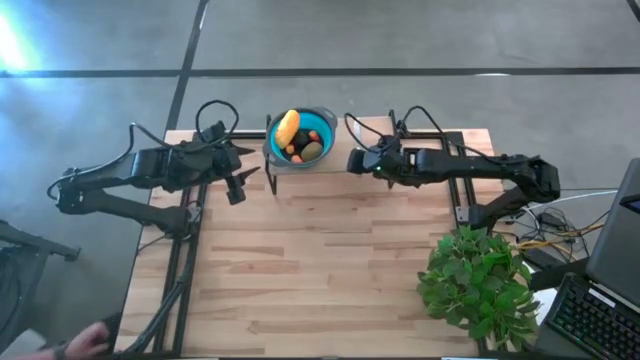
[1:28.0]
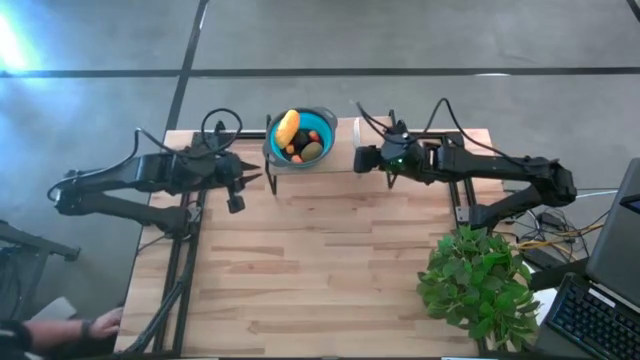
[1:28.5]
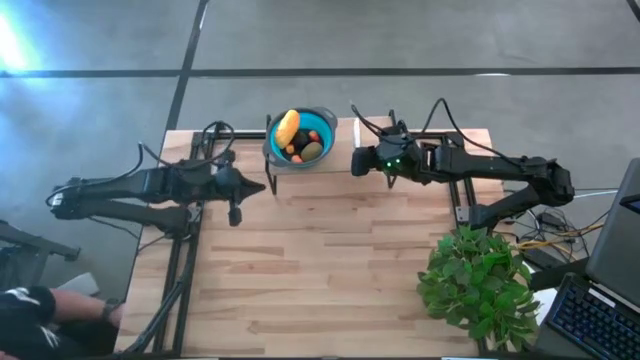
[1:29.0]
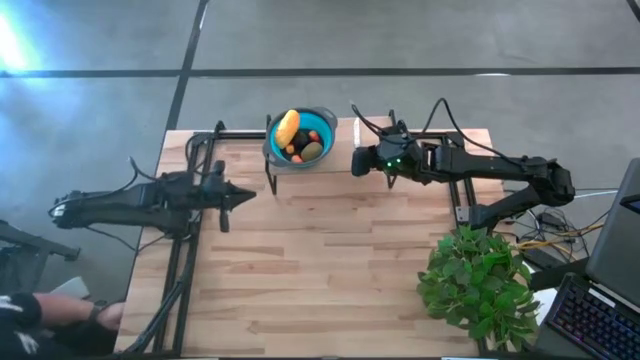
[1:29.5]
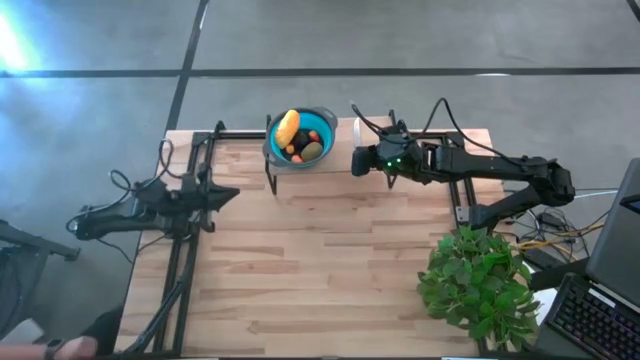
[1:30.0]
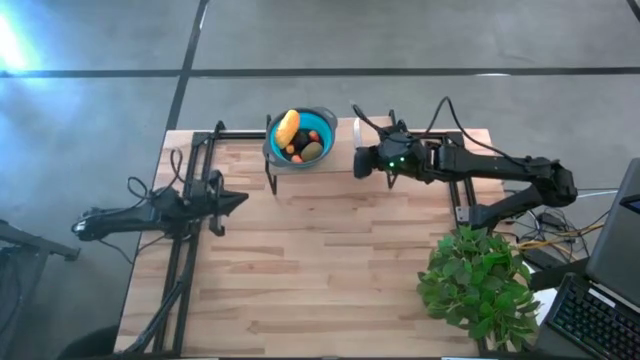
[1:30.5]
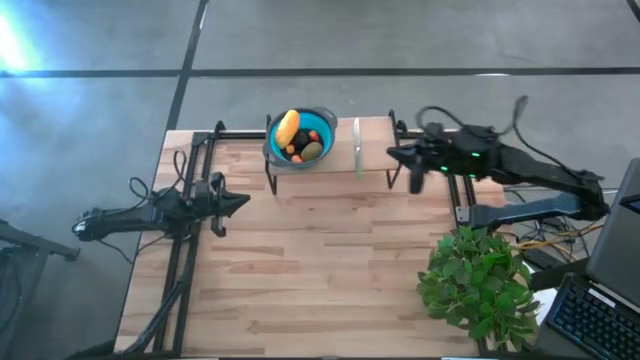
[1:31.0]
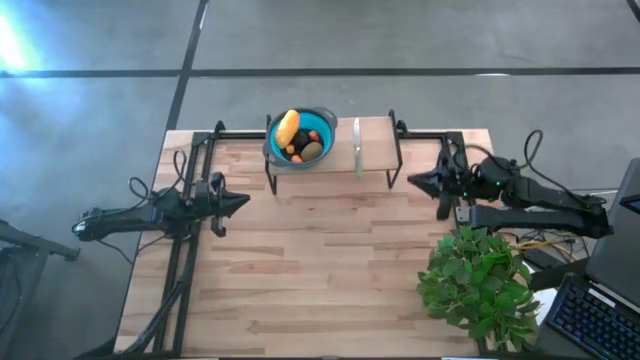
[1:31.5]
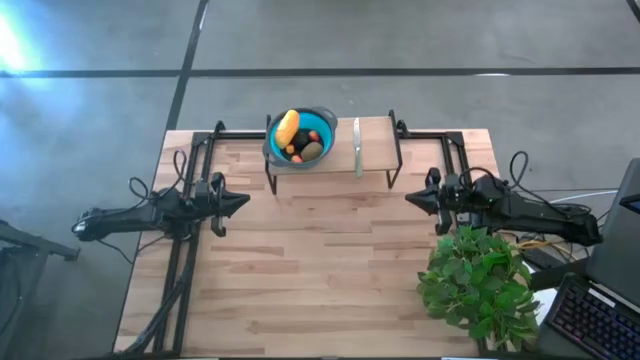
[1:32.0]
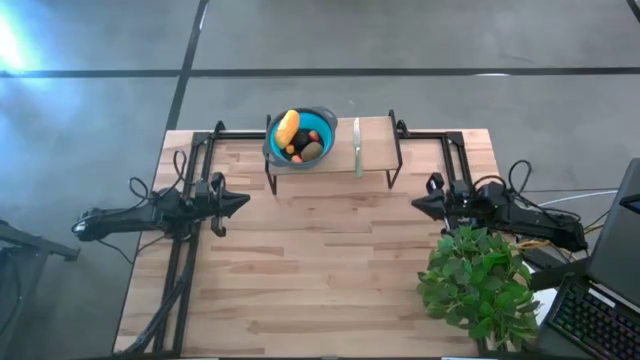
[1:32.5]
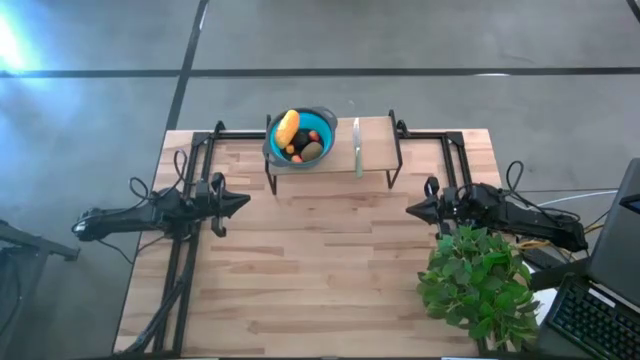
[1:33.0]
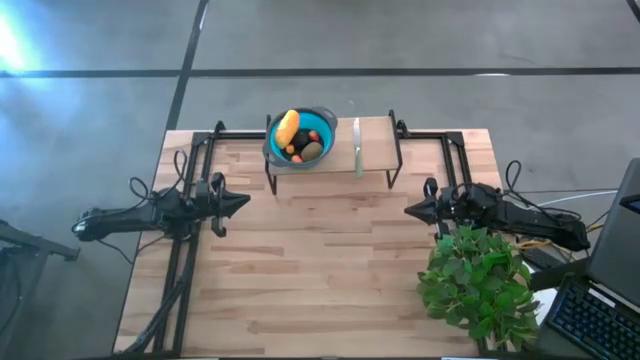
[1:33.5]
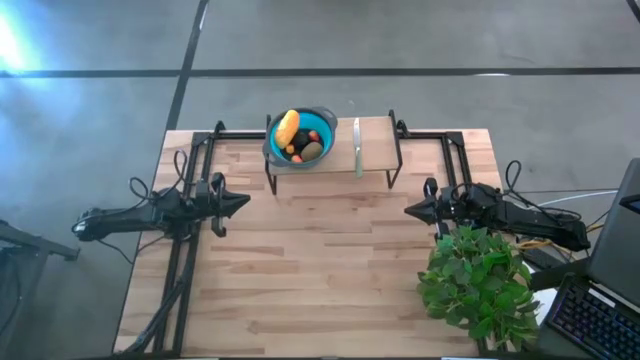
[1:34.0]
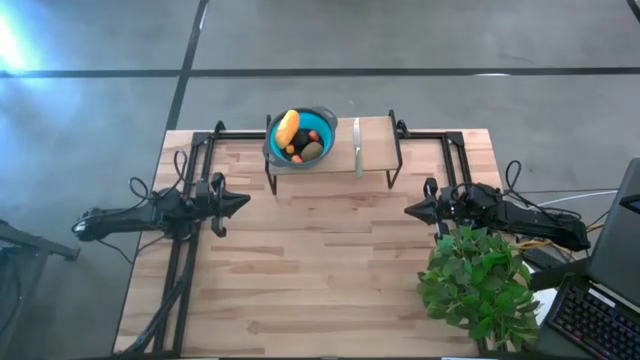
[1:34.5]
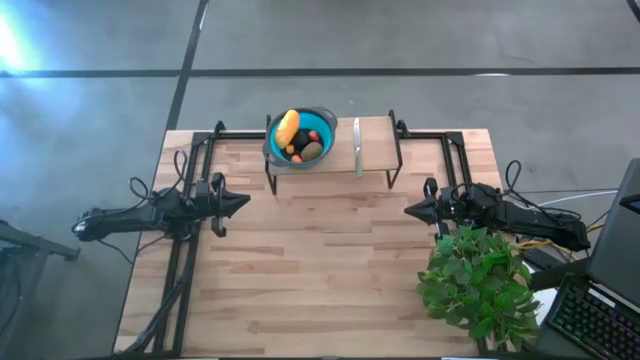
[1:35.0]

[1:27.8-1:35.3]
Task: Pick & Place Fruit
Return to Home Position

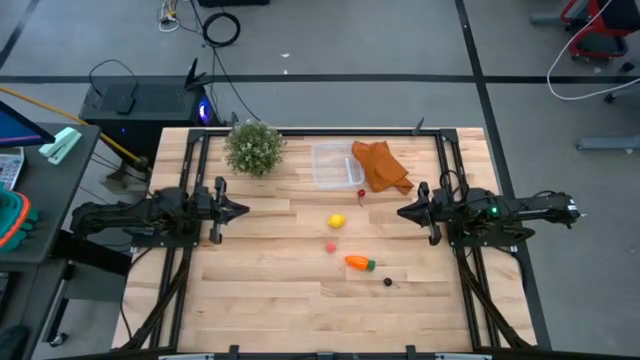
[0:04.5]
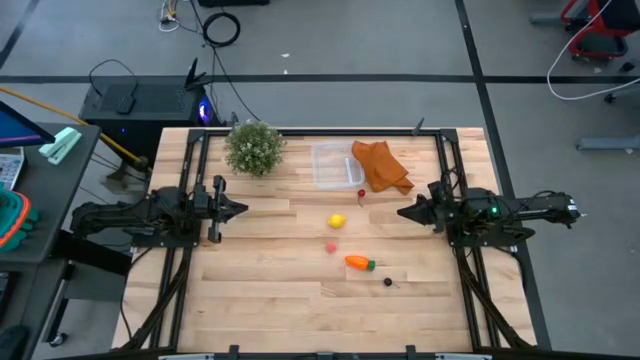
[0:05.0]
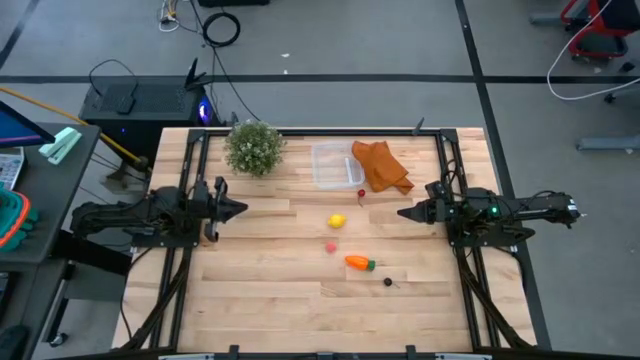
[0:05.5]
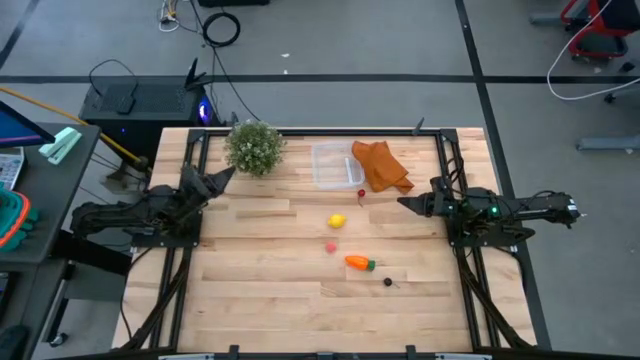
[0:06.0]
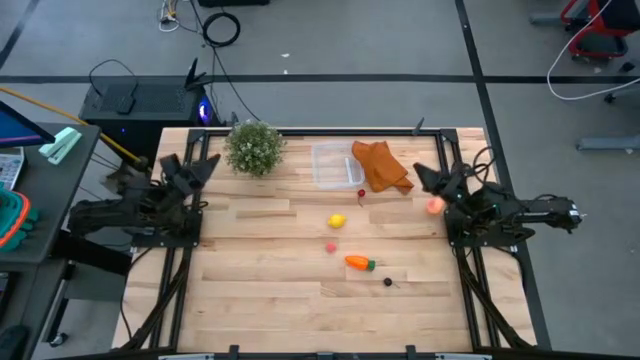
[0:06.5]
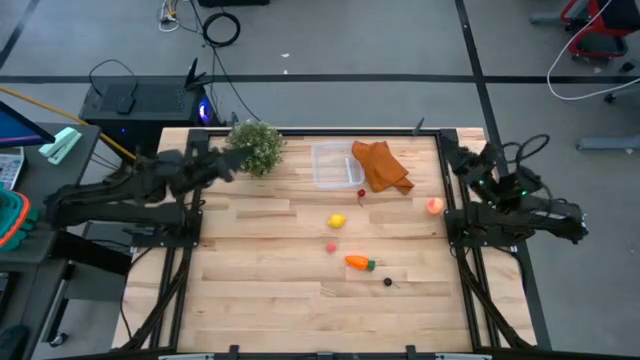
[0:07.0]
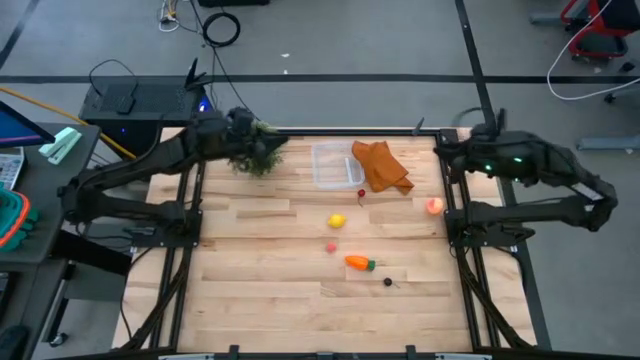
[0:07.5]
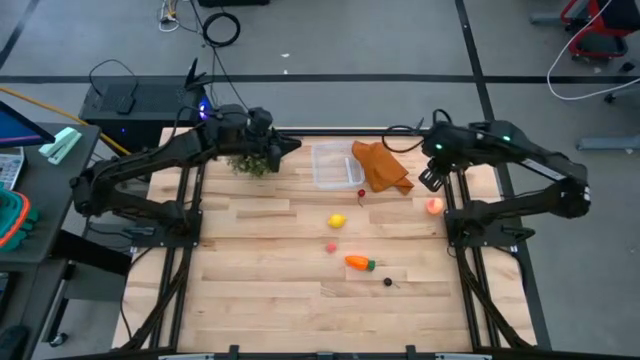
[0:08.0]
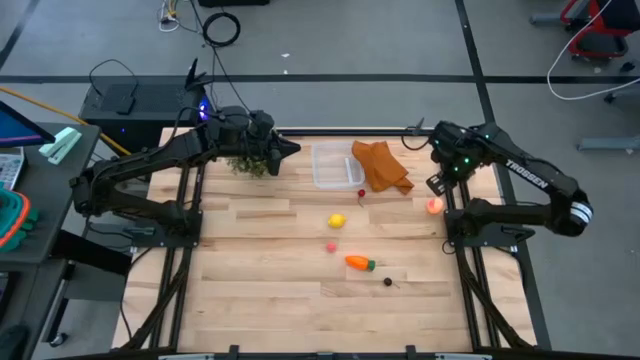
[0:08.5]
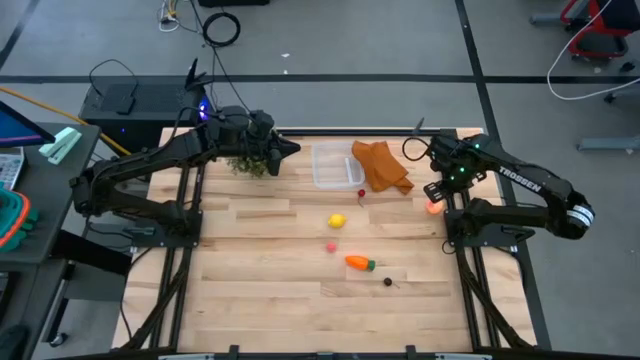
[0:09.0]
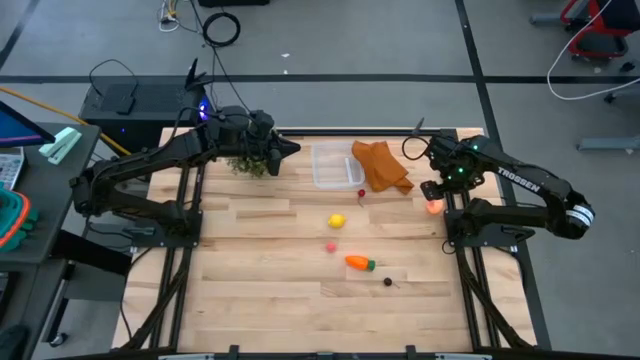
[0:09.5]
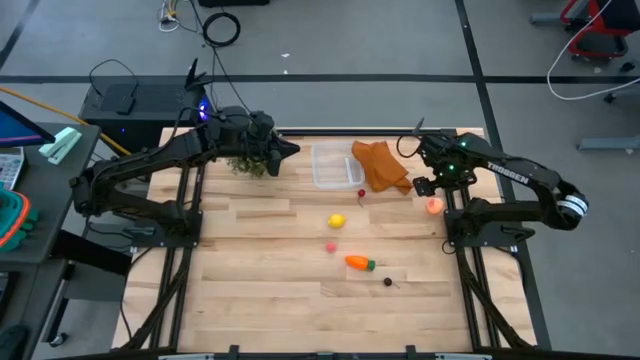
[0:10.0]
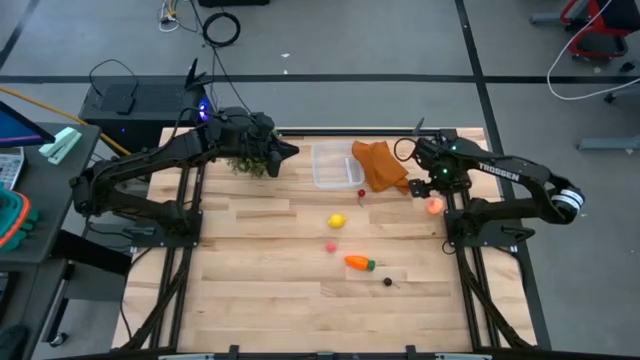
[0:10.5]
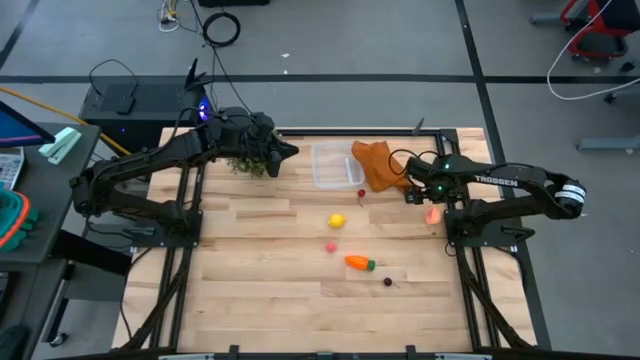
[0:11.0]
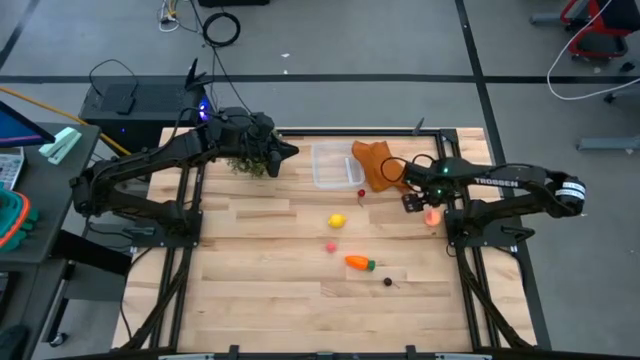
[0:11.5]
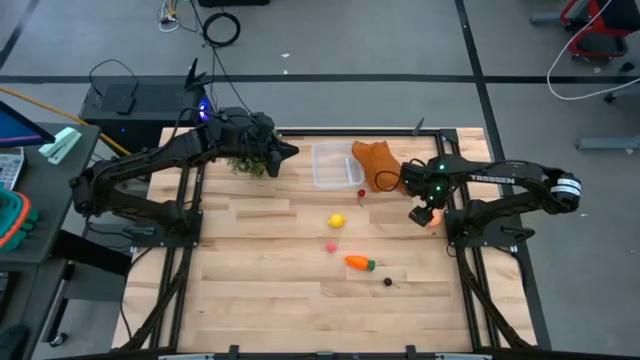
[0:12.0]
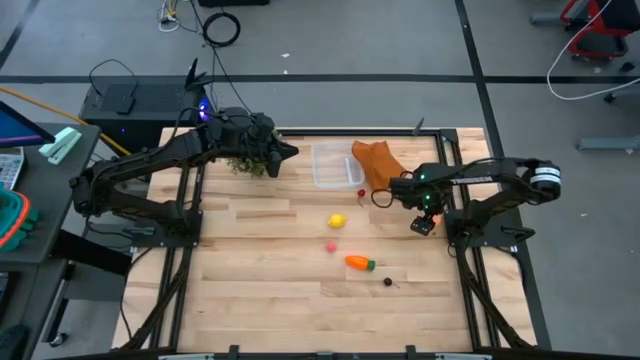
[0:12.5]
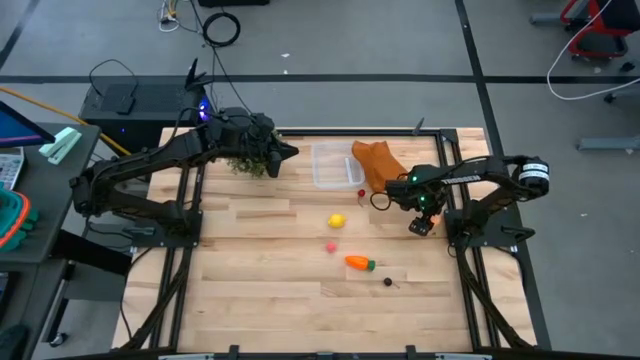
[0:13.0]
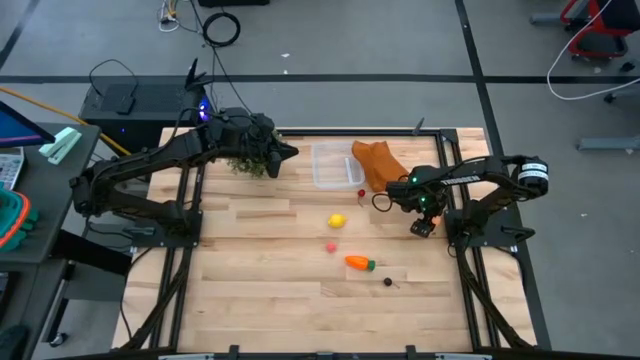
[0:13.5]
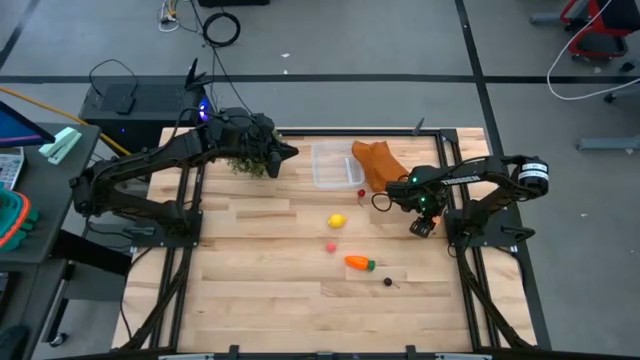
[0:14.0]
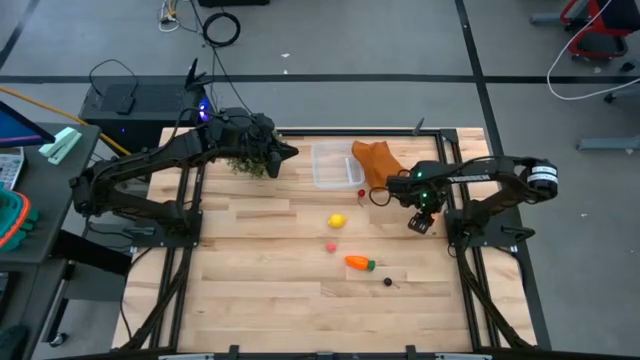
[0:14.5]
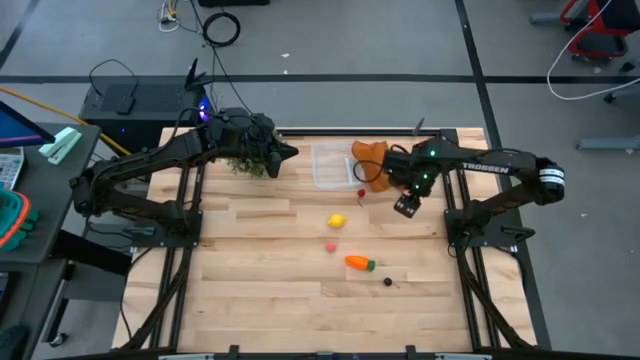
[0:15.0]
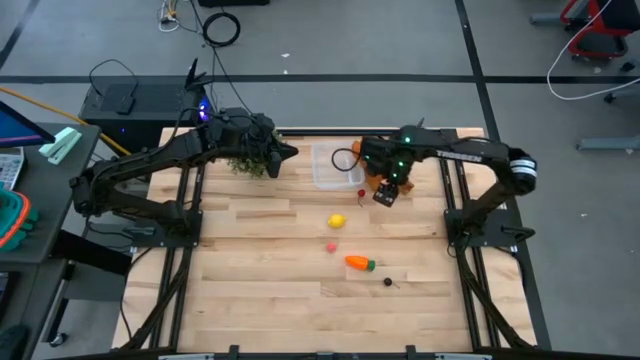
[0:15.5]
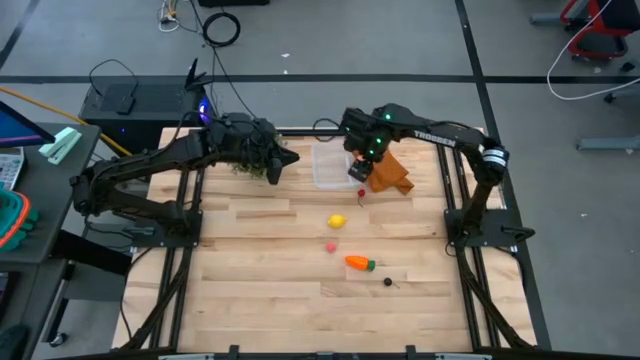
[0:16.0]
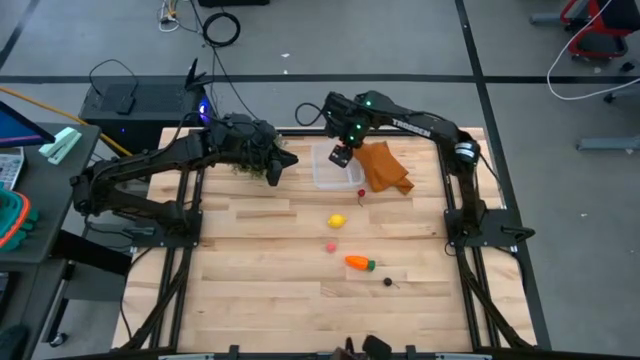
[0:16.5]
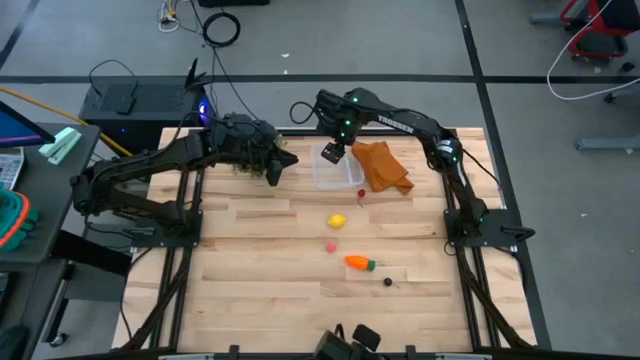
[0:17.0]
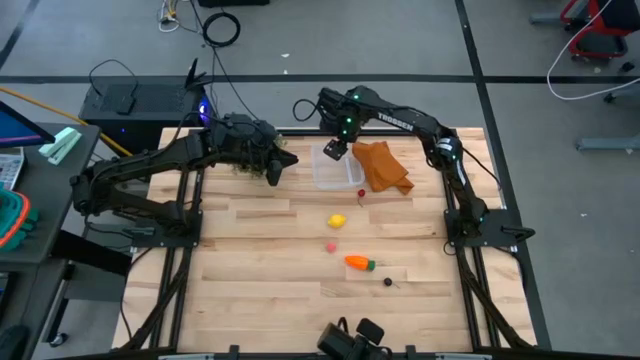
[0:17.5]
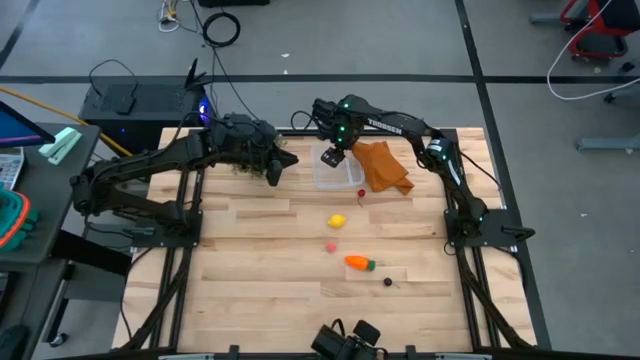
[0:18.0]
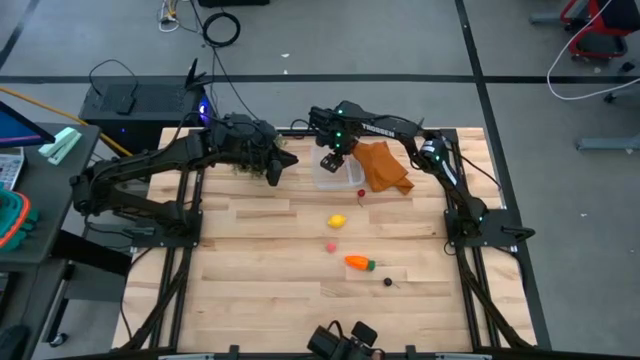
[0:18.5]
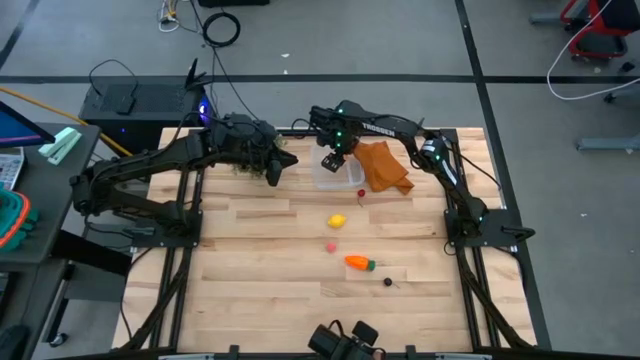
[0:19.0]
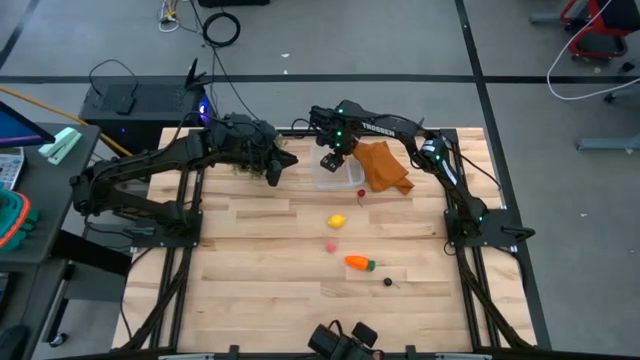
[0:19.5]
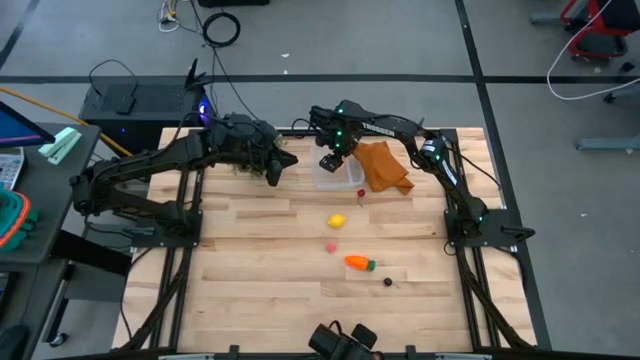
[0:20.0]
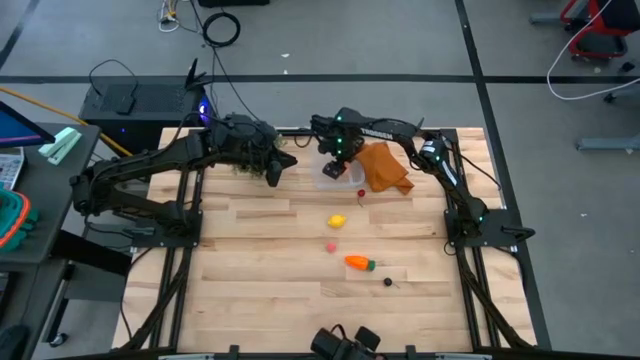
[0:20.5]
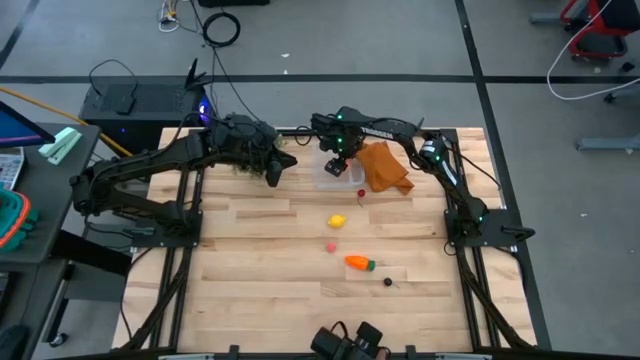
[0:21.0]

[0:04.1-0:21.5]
Task: Pick and placing Produce into tupperware
Put the big peach into the transparent bin
